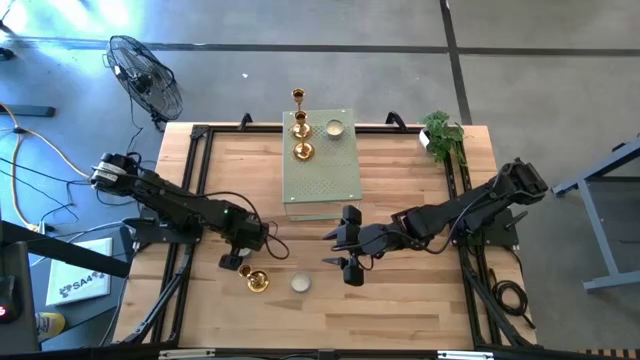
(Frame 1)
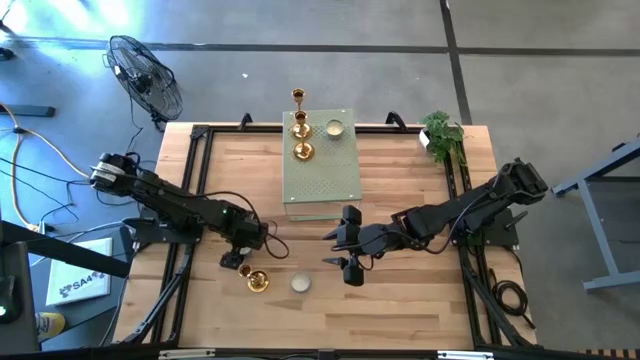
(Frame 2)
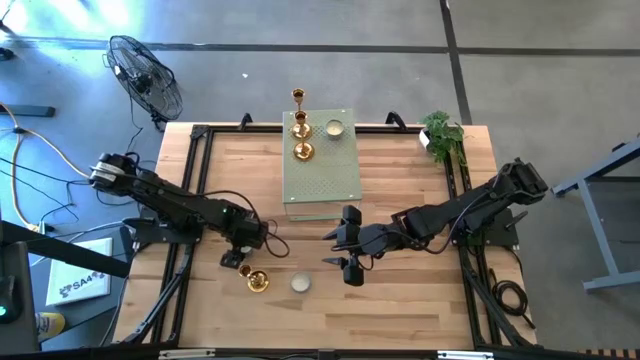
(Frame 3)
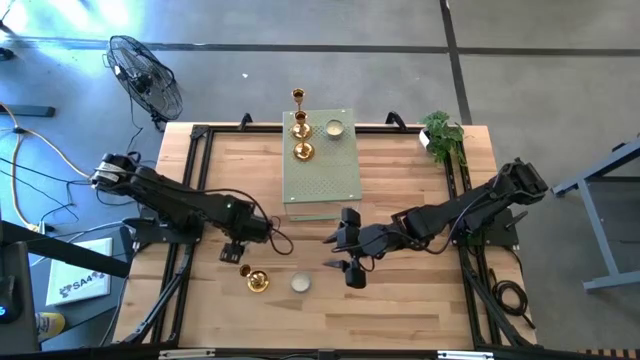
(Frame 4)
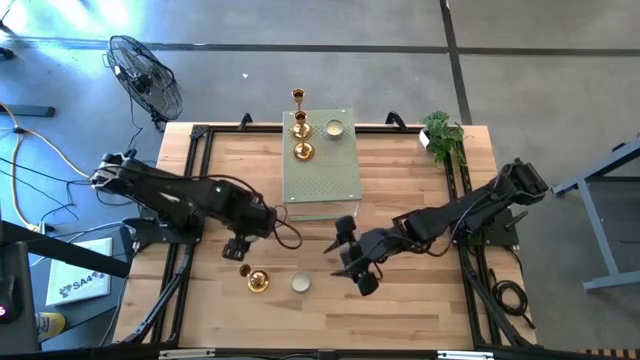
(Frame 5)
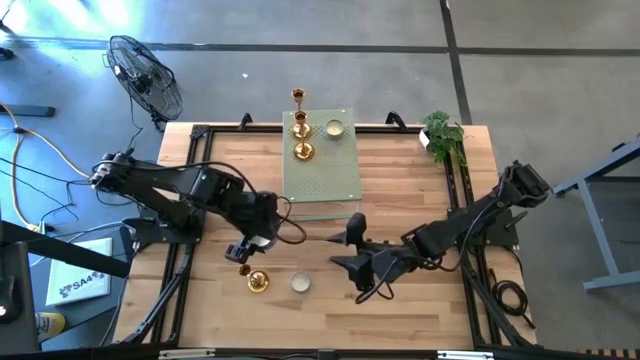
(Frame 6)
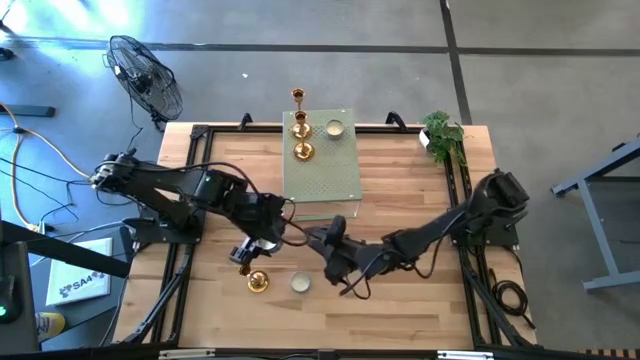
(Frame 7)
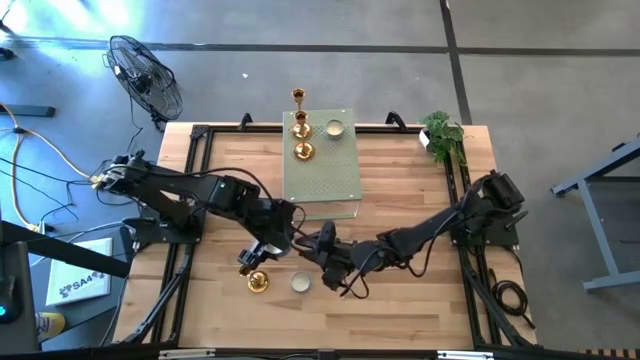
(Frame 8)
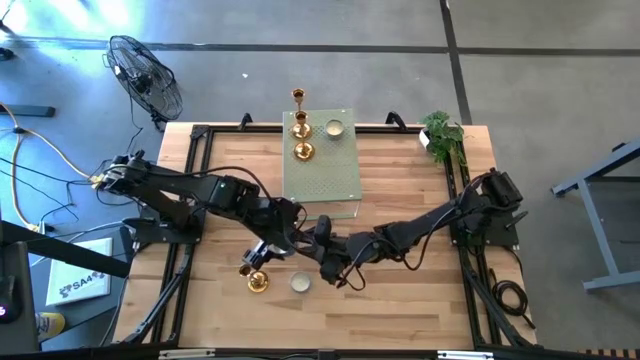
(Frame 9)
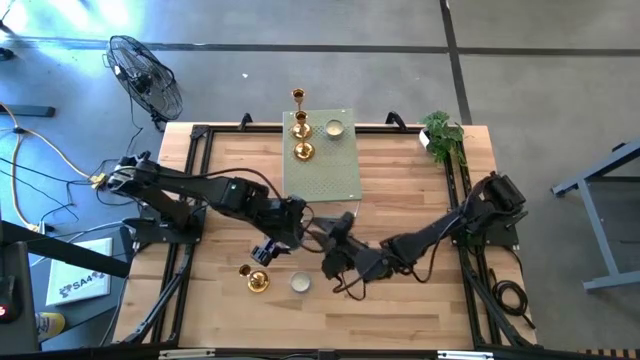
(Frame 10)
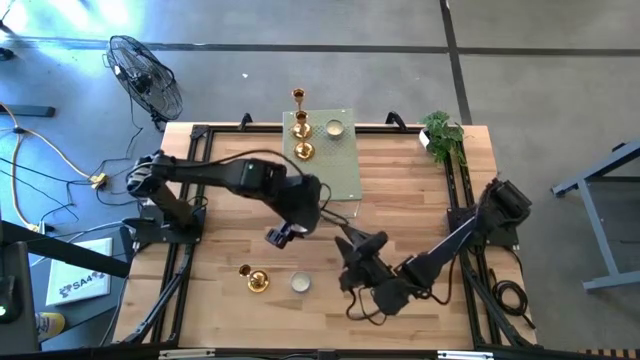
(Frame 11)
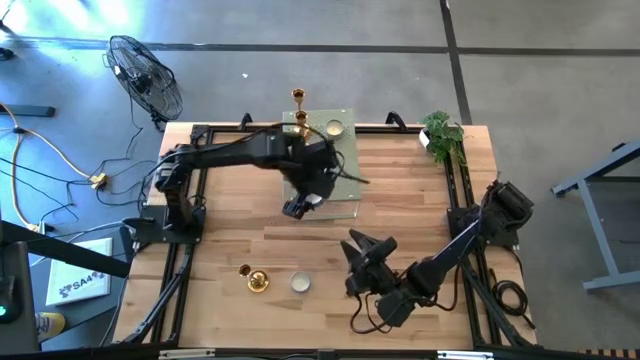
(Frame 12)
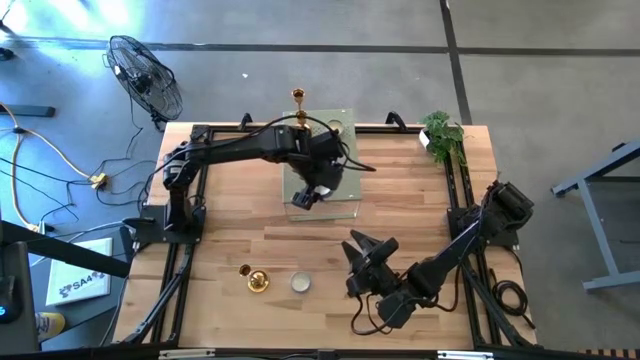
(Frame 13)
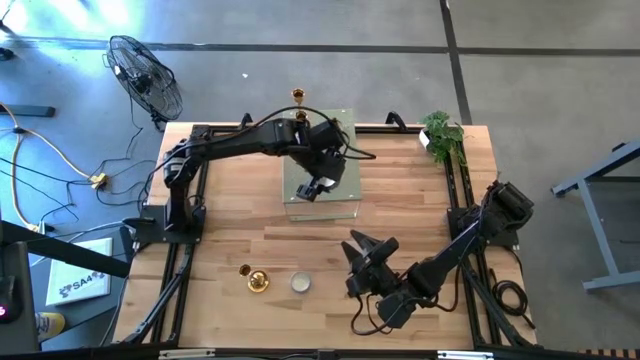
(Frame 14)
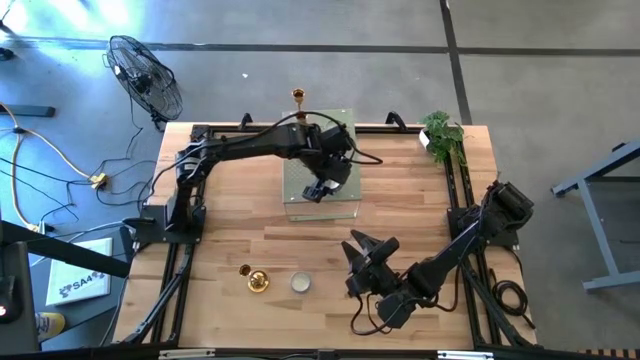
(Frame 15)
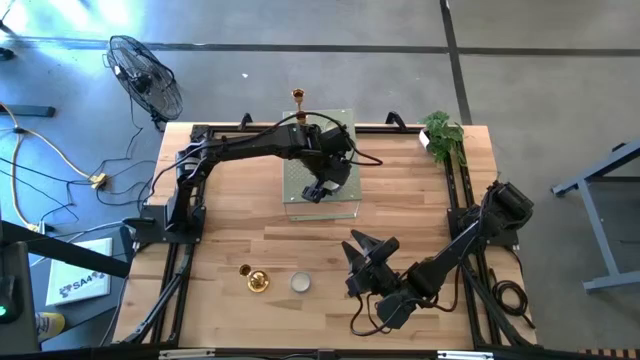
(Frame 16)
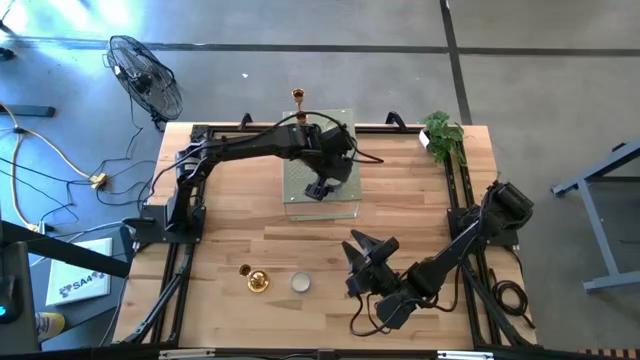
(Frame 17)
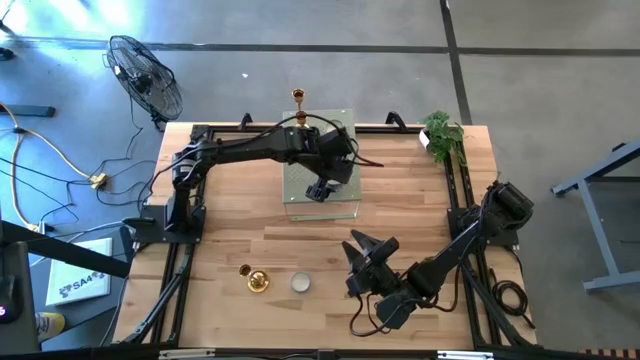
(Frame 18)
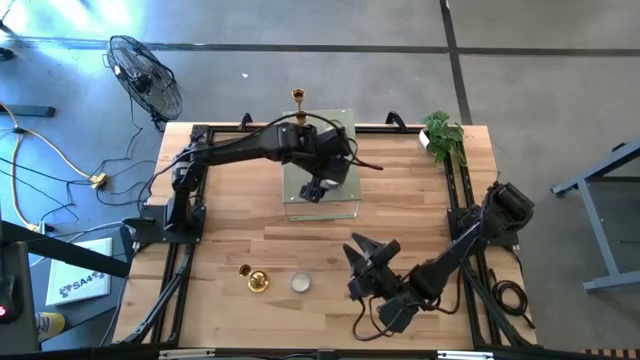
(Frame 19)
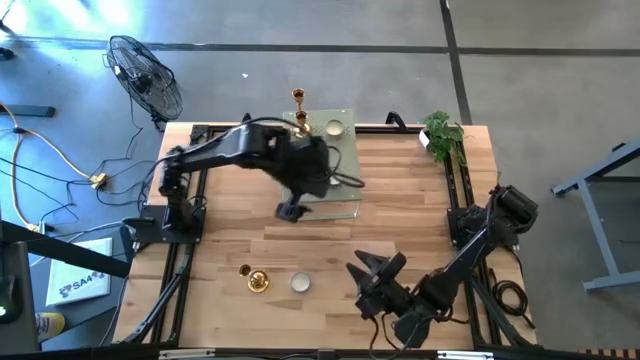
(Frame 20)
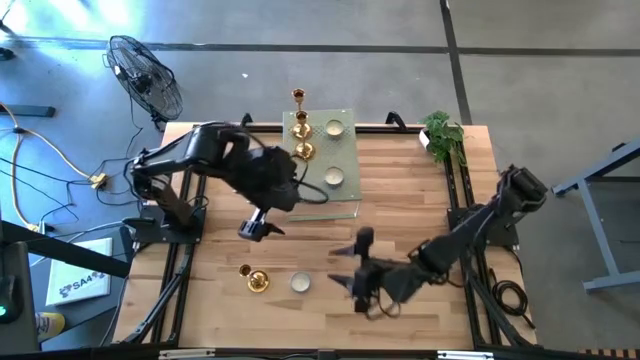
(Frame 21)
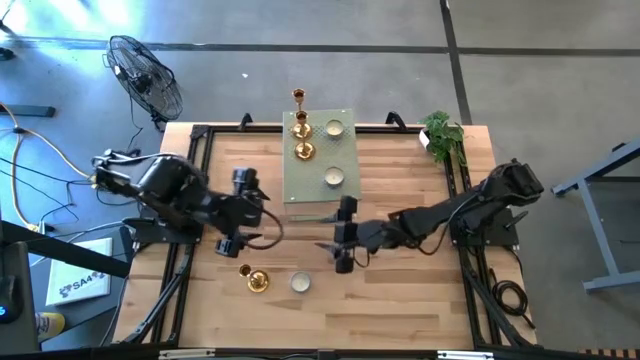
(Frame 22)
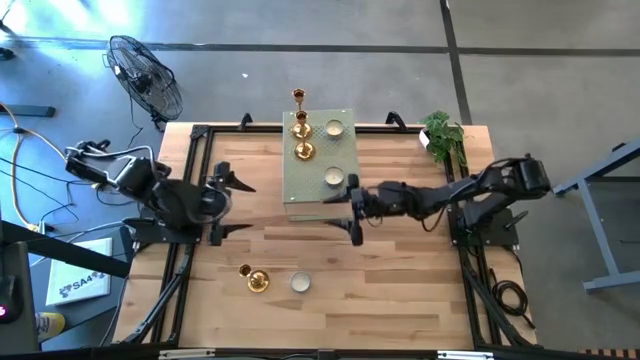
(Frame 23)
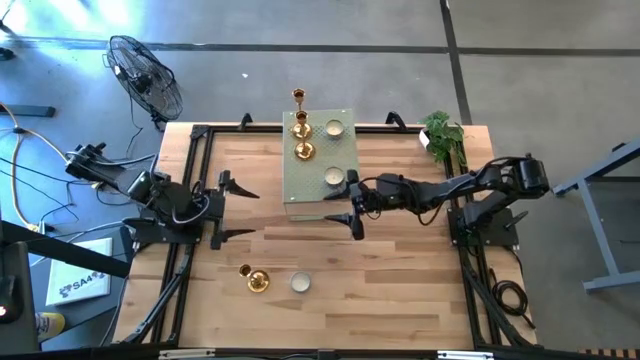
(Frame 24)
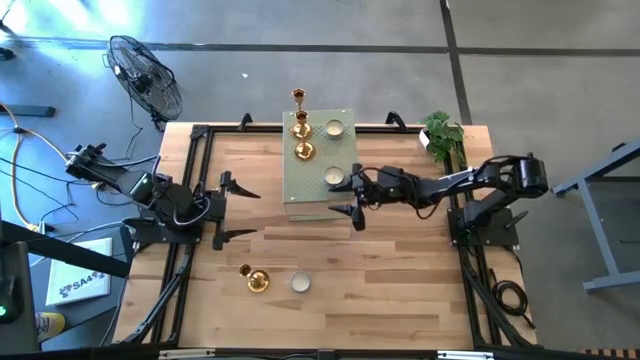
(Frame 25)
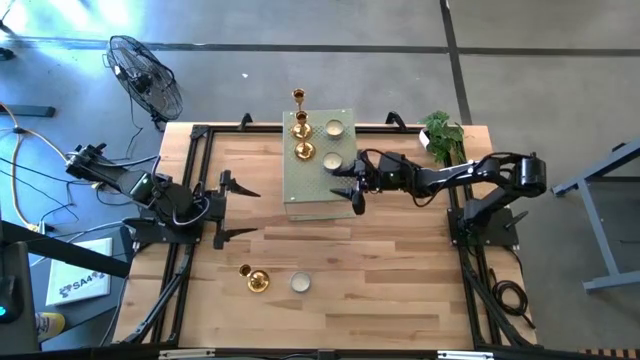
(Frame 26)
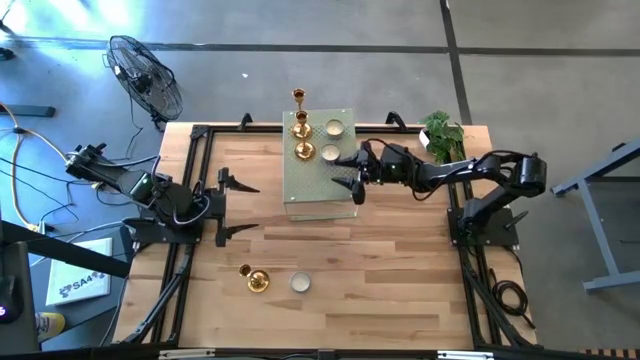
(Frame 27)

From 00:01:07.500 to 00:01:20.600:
Task: Pick & Place candle stick holders
Put the top blue scented candle on the shelf aligned with the other blue scented candle

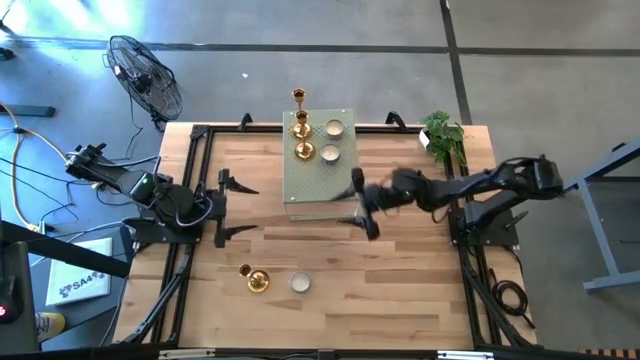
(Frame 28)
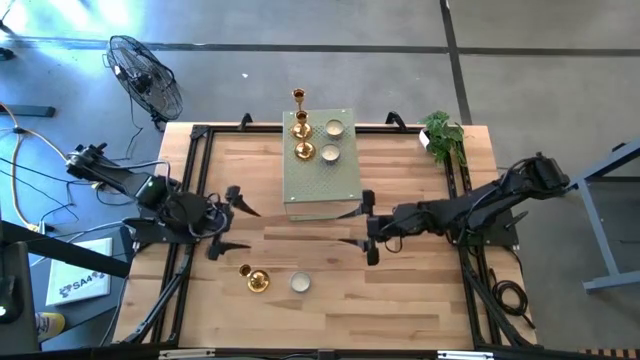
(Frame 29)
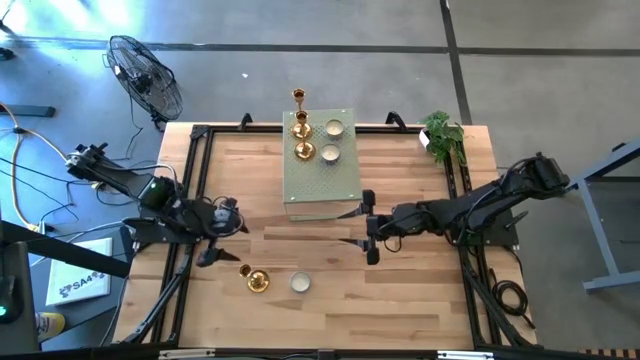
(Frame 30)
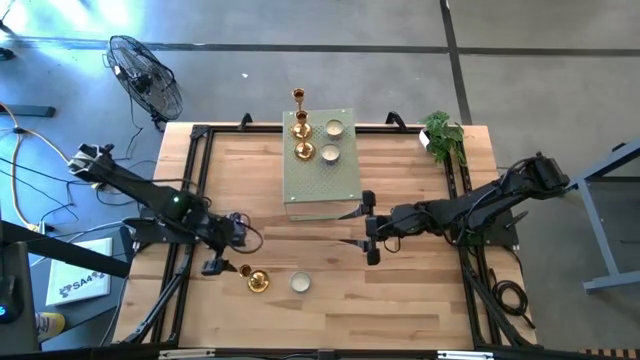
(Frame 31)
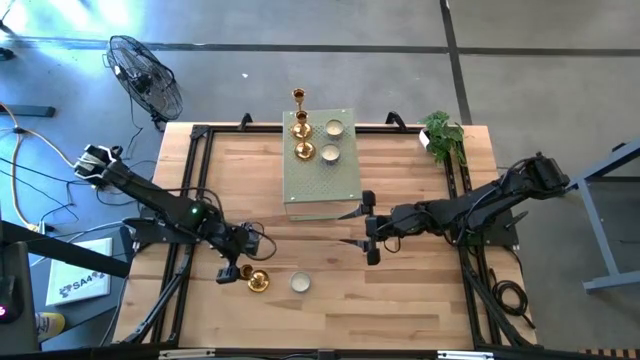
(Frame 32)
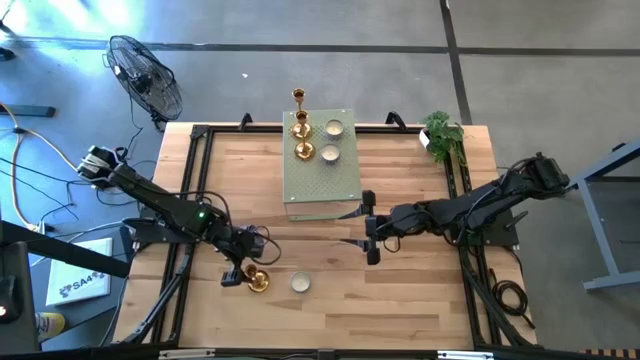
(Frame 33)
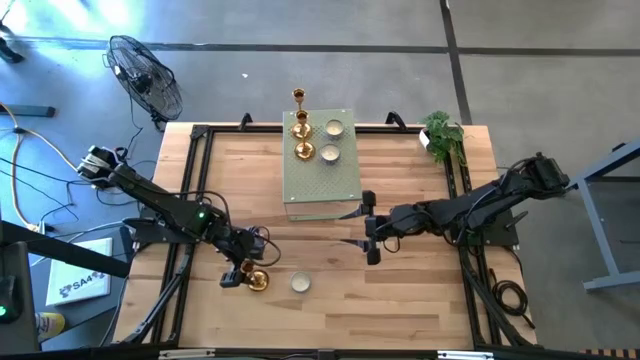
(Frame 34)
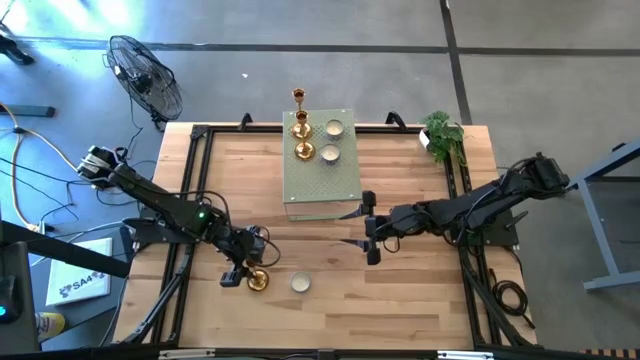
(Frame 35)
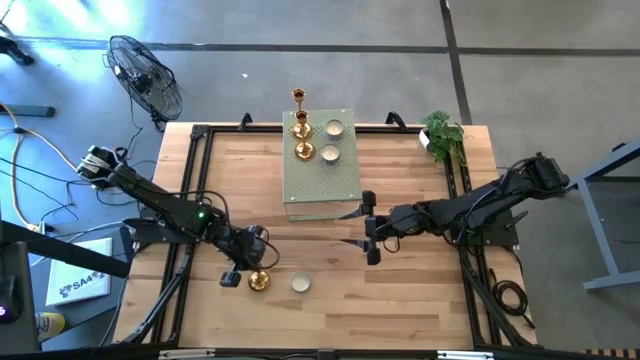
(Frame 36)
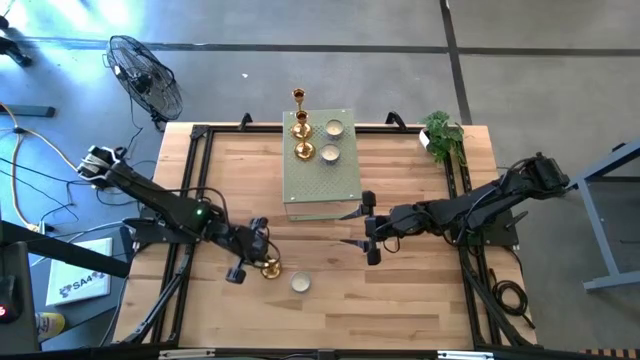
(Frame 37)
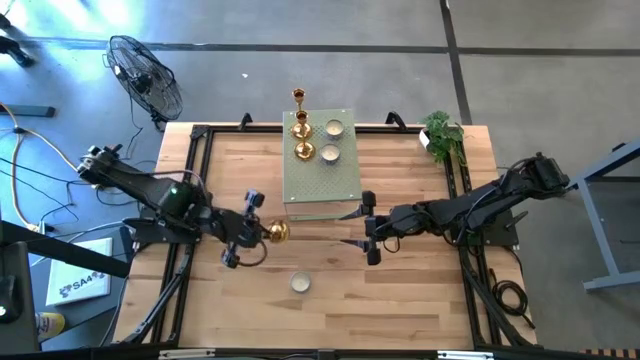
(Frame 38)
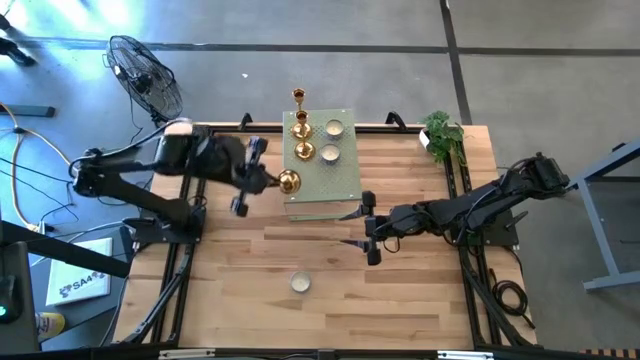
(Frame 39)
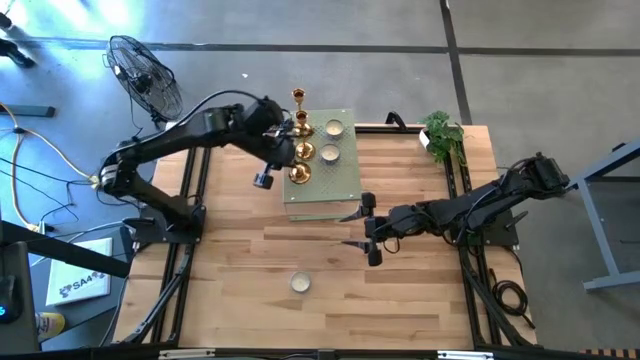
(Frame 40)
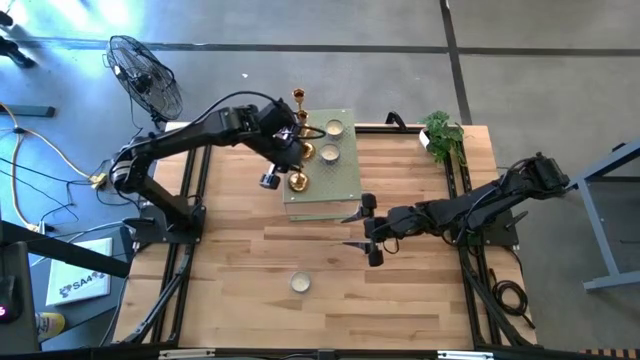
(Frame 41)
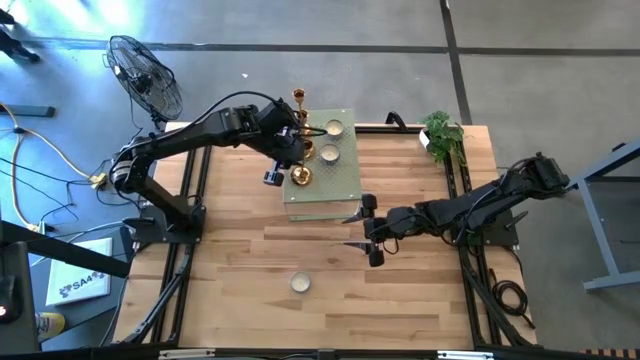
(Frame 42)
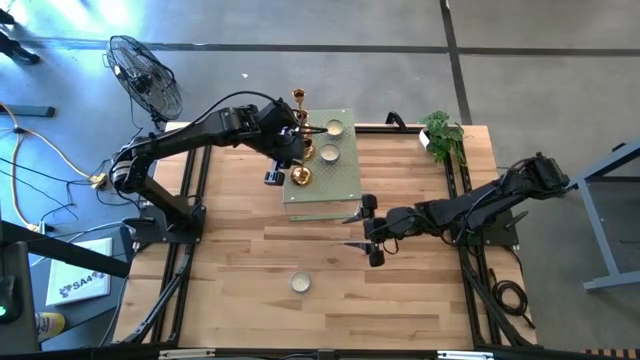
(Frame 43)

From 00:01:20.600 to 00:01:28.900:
Put the gold candle holder on the shelf aligned with the other gold candle holders

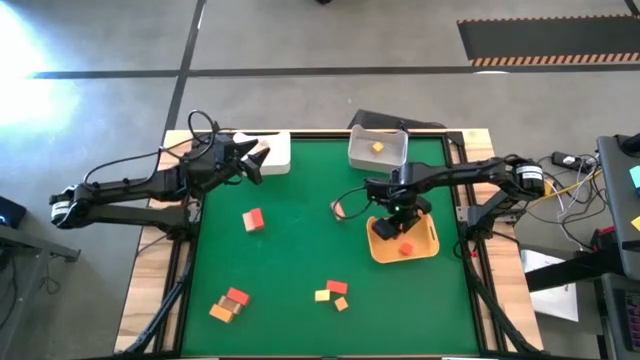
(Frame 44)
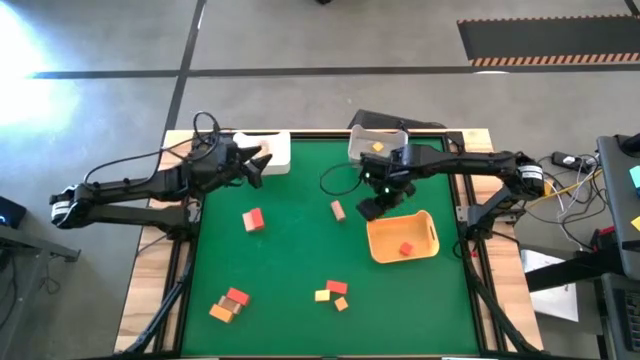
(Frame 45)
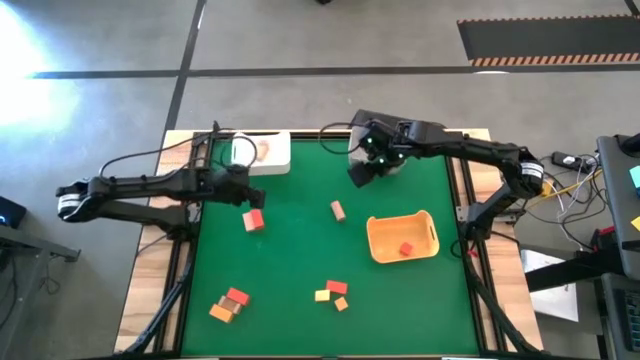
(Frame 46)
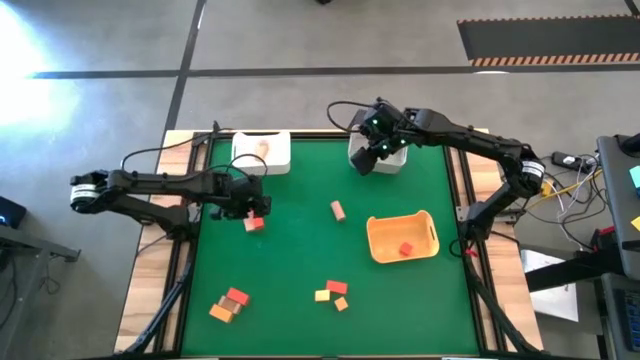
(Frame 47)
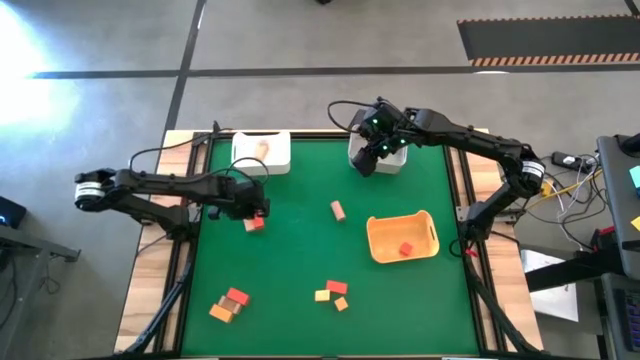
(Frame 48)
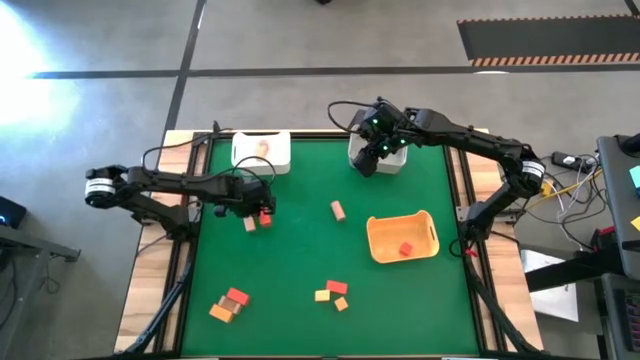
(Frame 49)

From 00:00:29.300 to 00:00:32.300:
Task: Sort & place blocks by color
Adjust the orange block
